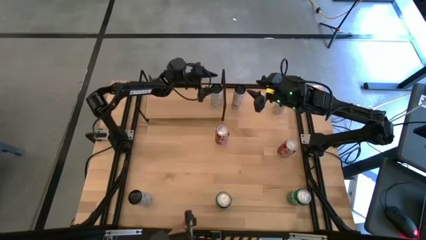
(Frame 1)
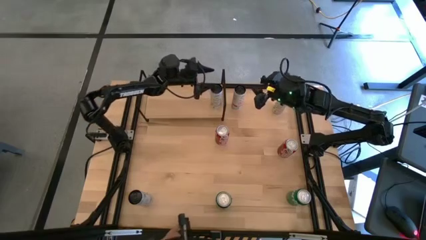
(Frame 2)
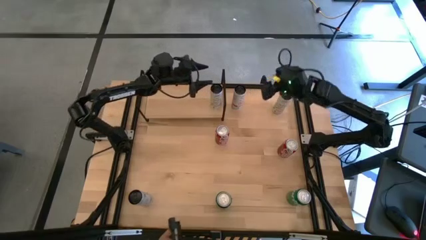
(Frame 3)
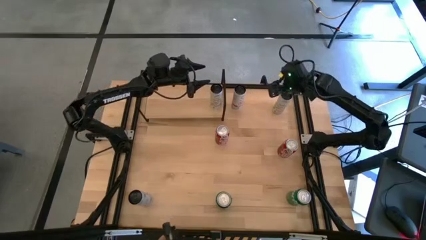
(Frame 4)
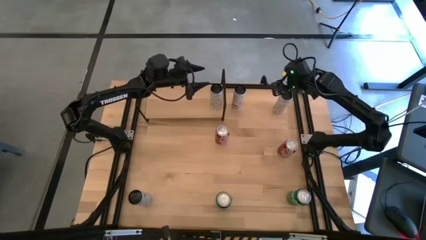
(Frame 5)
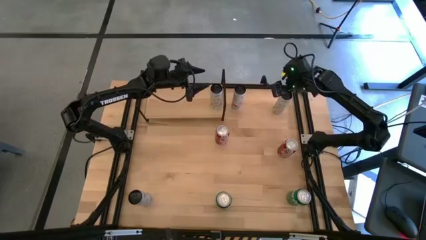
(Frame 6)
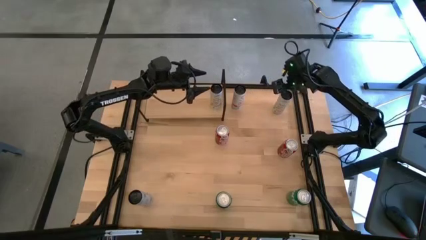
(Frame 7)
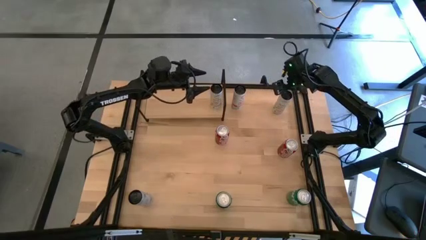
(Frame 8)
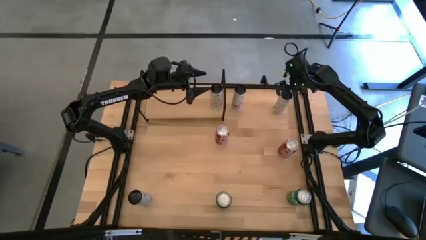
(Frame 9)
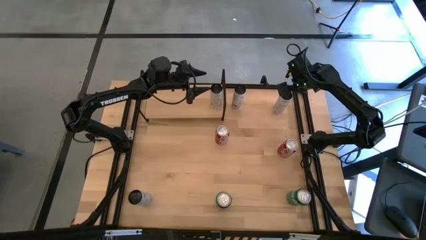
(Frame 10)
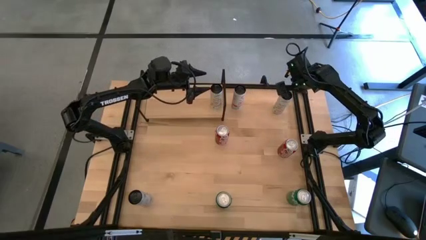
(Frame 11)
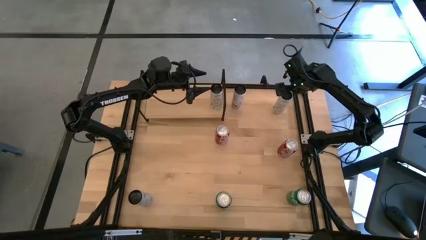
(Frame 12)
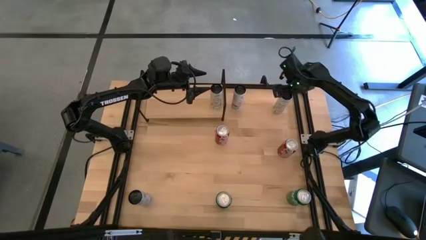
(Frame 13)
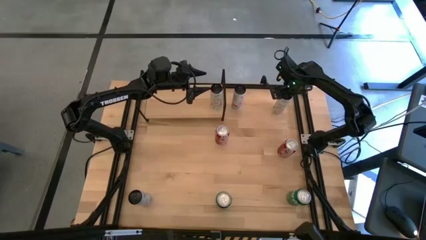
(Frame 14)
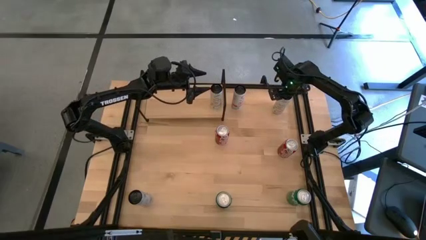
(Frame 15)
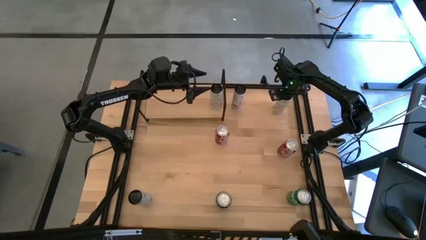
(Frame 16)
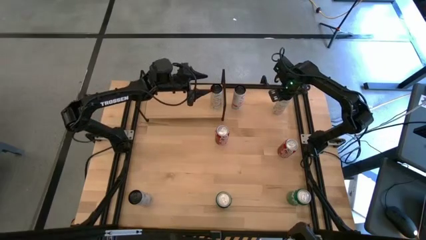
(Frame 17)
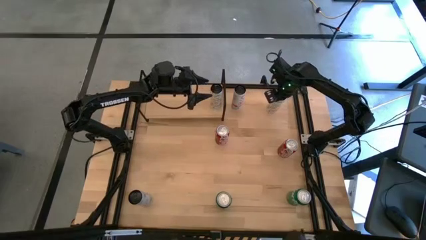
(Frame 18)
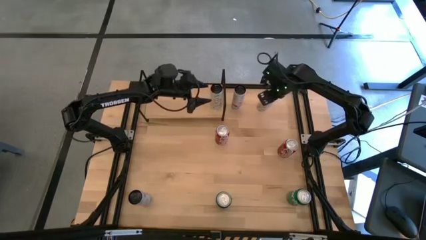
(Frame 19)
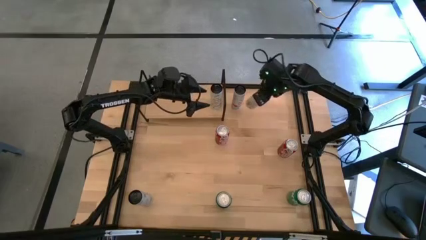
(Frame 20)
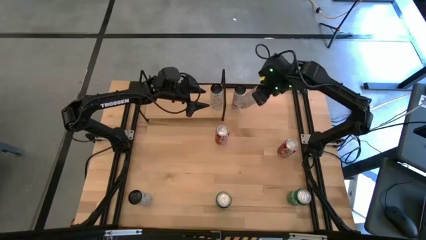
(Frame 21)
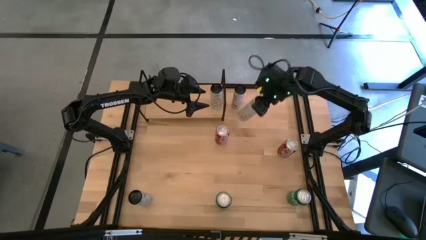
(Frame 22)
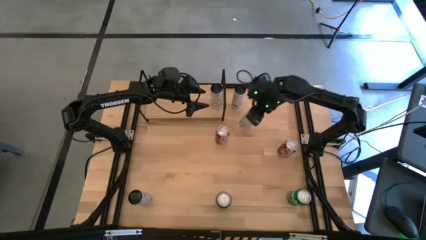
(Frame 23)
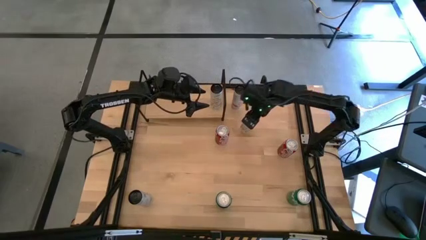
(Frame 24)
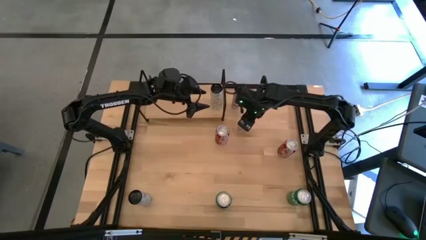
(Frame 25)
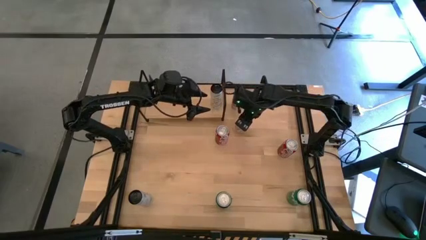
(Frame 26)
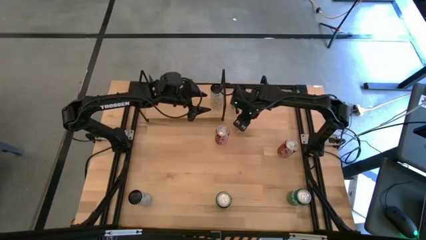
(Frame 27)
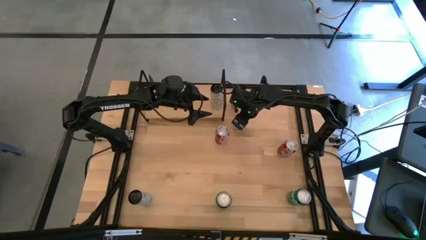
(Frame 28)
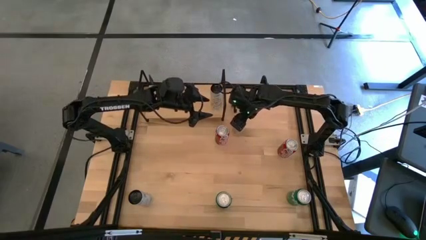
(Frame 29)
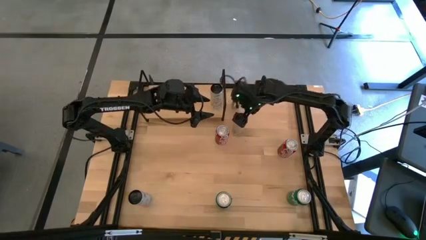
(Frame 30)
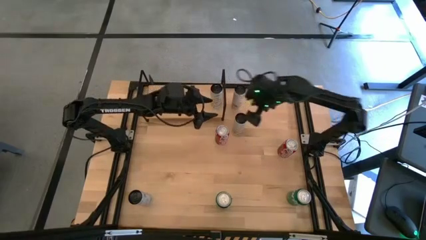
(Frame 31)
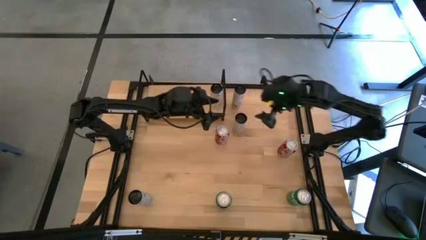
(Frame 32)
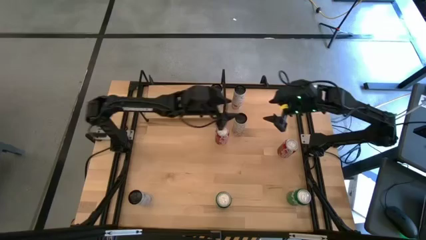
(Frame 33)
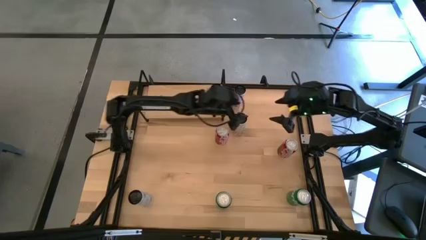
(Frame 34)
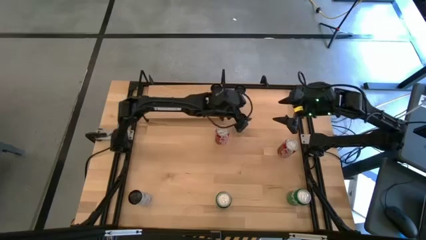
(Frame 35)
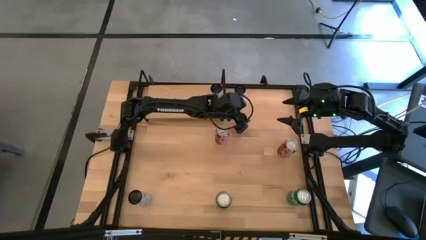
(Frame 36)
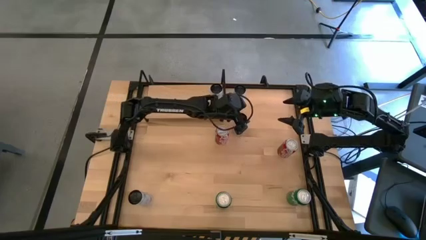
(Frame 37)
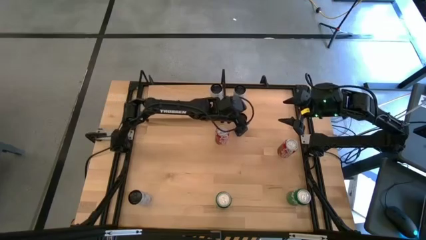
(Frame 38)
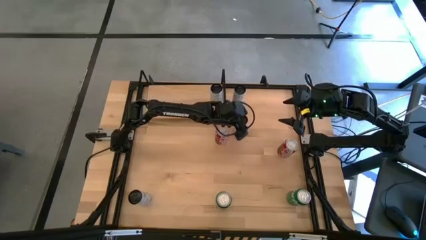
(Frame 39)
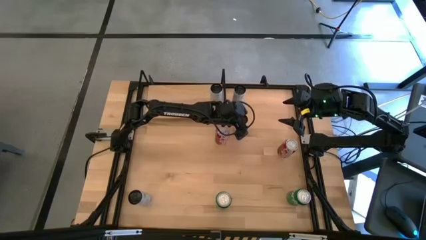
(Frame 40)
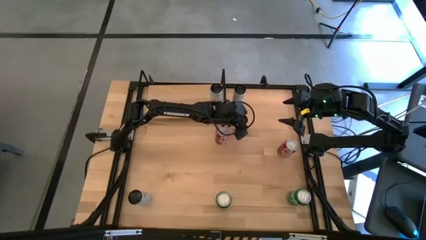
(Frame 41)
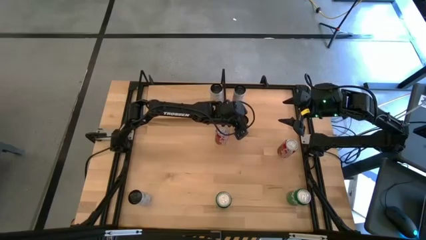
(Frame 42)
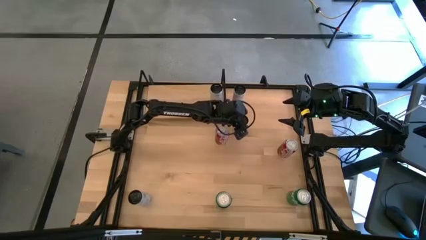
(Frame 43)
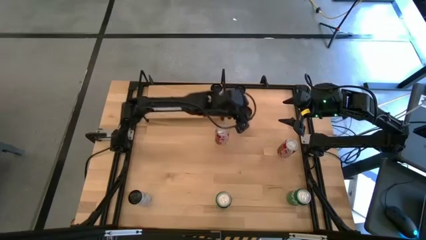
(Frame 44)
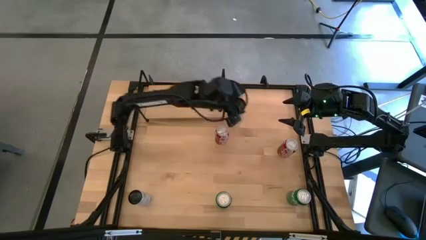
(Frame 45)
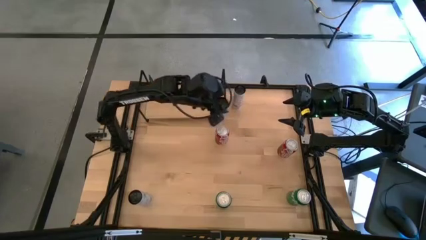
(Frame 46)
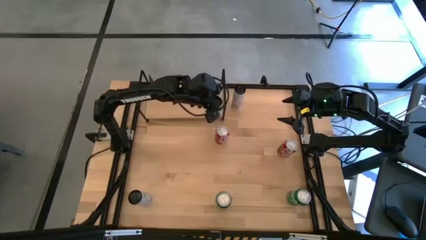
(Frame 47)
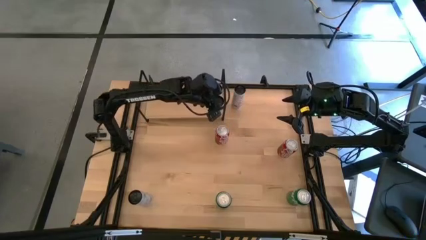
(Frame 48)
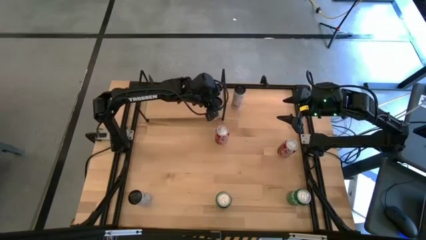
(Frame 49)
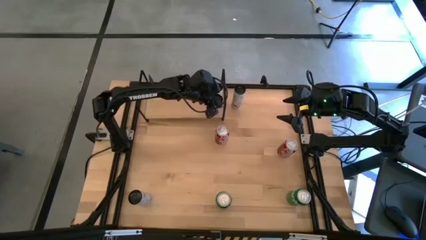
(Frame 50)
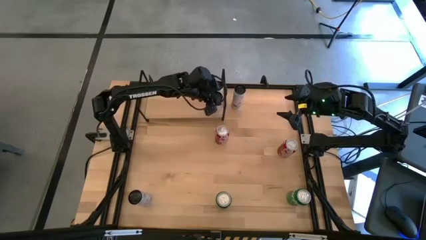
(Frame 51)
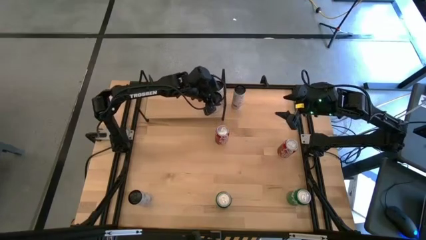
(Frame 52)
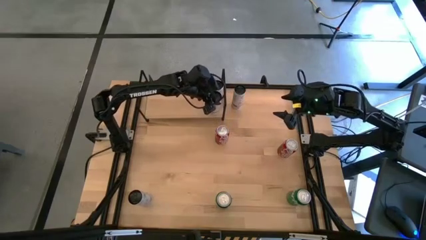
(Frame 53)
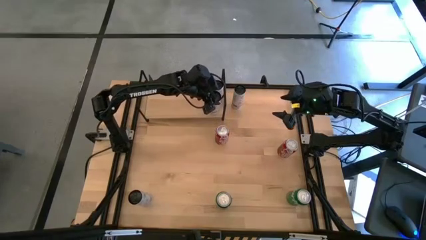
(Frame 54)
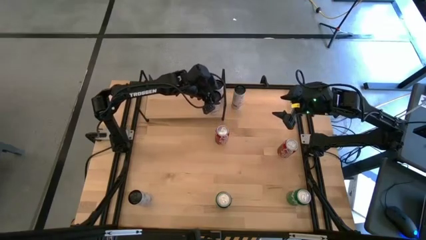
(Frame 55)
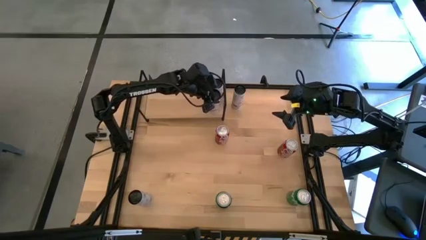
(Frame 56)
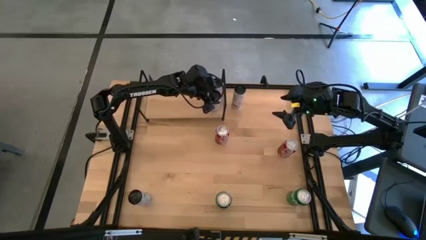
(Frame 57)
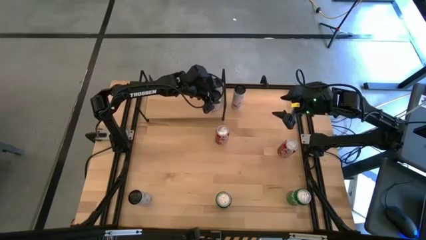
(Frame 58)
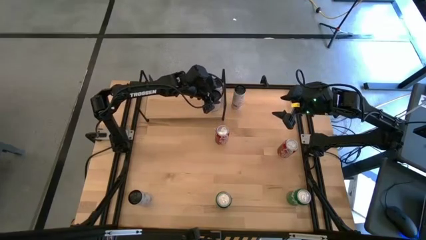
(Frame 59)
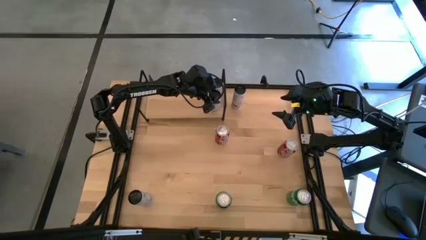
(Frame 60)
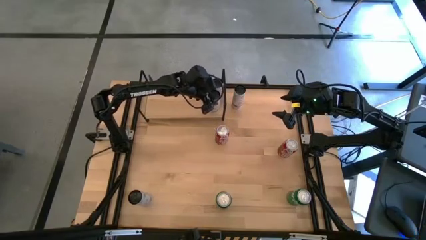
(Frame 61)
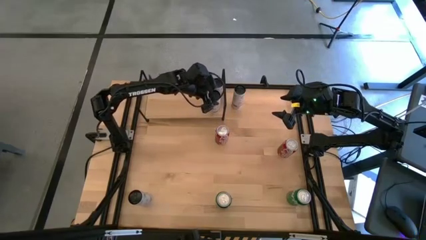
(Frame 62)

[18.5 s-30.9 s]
Task: Place canned beverage on shelf
Put the top white yellow soda can on the shelf aligned with the other white yellow soda can

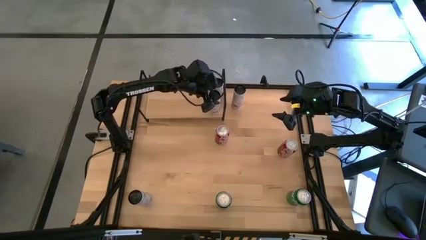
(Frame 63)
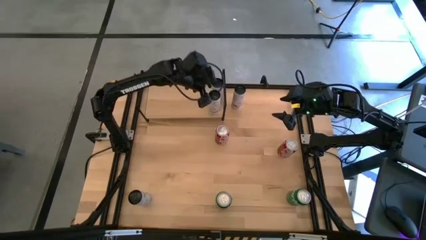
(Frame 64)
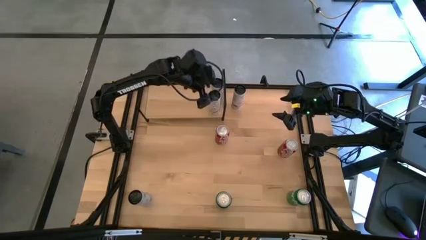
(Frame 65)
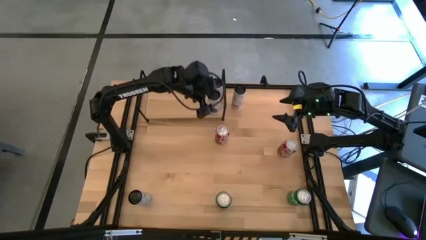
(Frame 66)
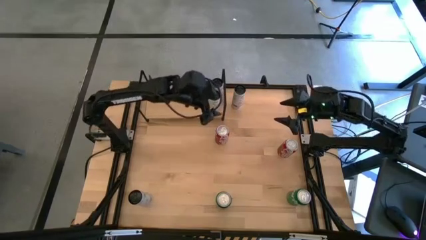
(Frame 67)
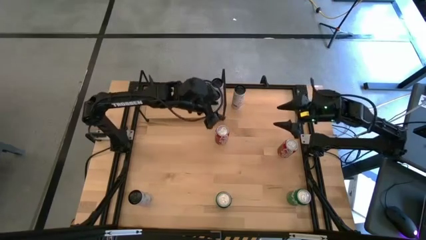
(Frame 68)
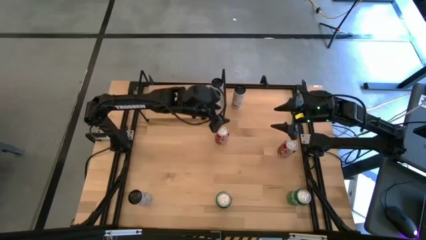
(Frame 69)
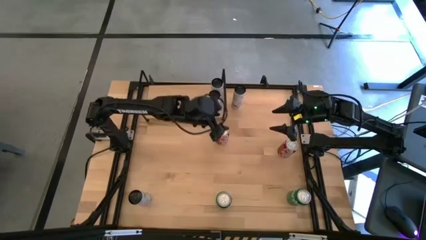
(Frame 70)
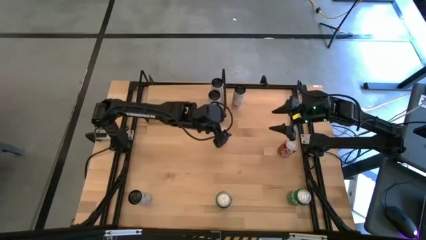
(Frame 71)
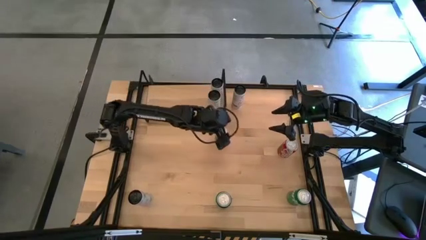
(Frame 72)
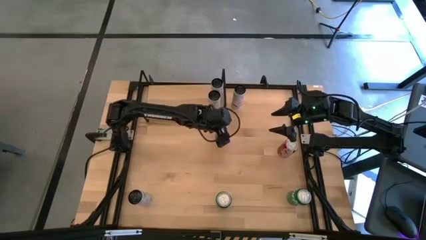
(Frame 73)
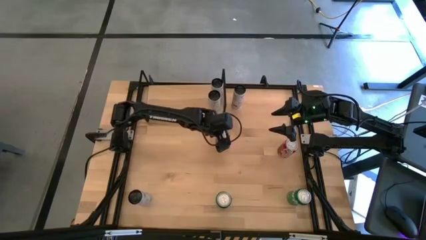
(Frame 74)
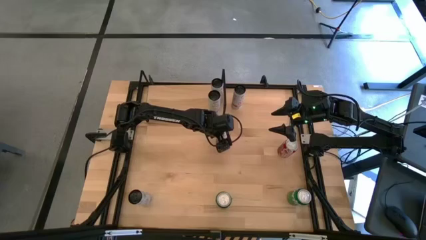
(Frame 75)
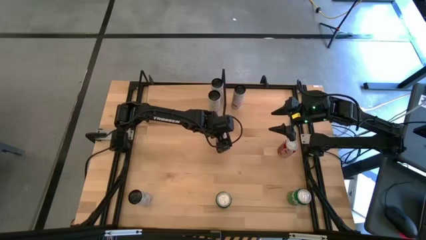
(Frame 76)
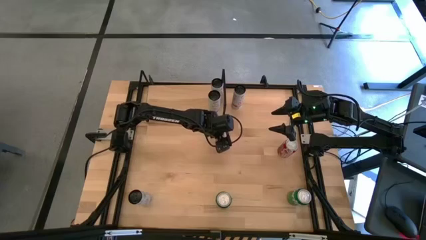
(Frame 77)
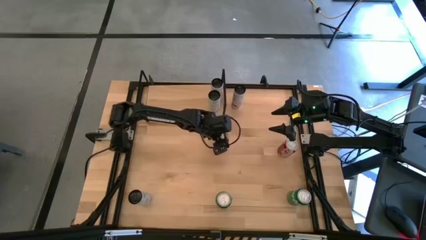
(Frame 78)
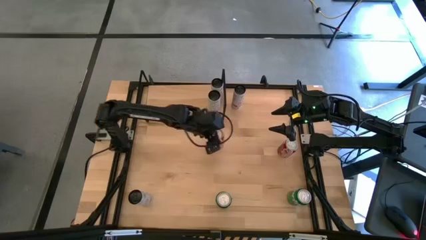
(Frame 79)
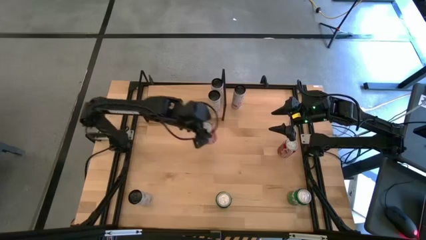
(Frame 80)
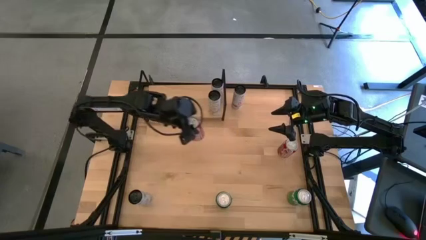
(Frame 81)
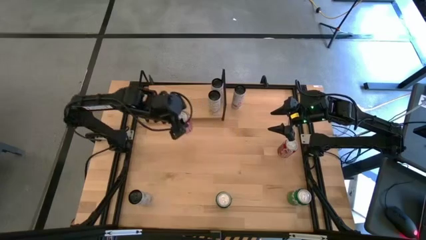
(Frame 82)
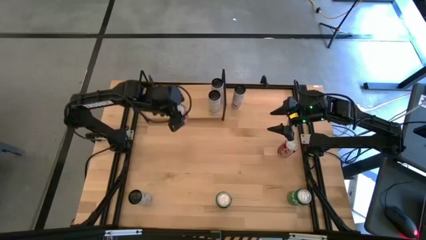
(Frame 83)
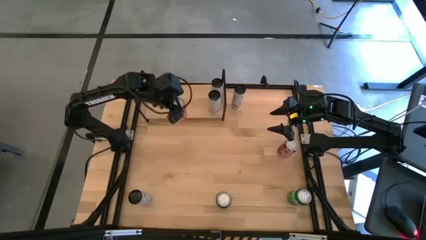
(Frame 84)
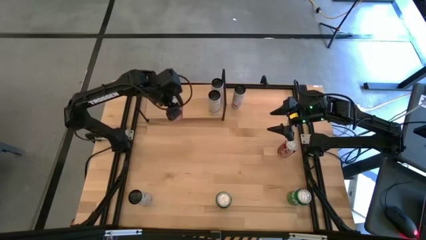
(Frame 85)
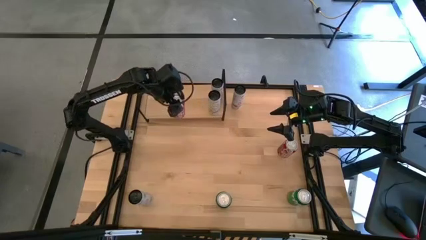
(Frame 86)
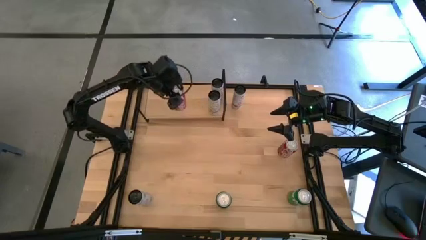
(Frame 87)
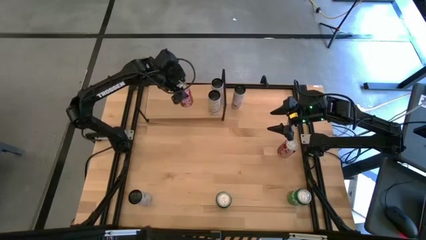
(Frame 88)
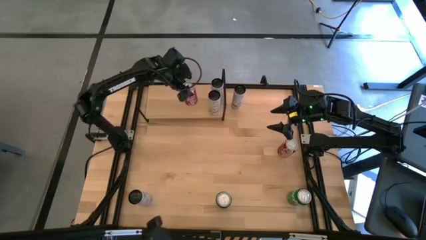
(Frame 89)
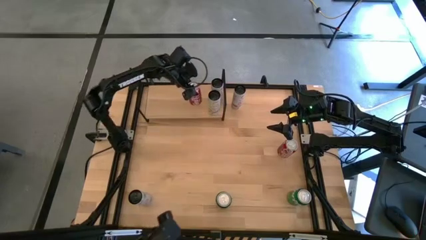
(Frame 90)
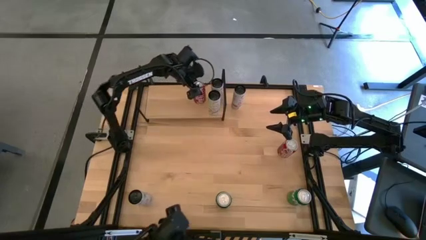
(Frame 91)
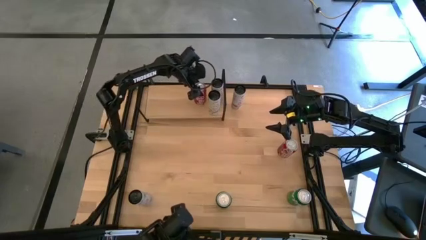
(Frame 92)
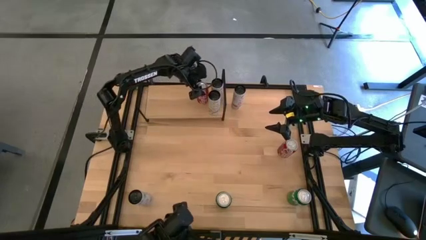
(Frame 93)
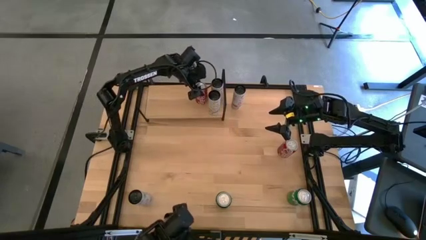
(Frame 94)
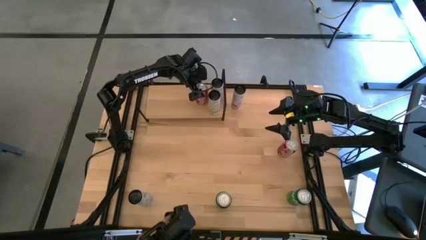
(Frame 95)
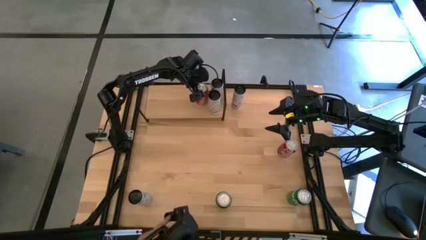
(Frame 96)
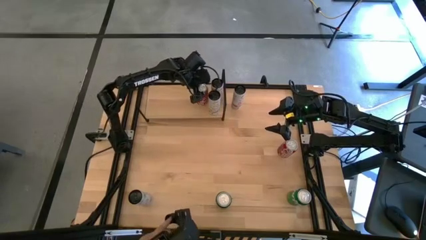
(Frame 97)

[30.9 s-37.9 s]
Put the left red white soda can on the shelf
